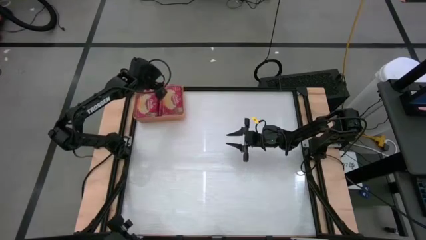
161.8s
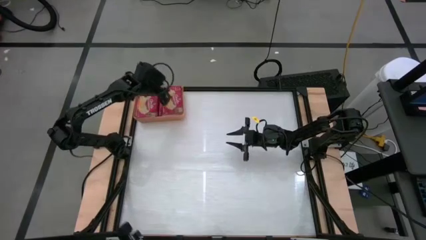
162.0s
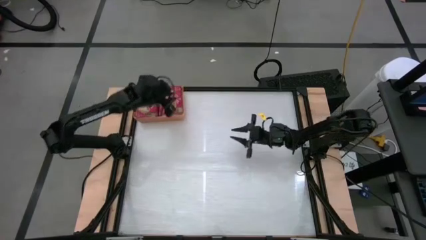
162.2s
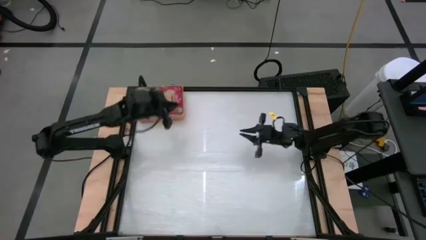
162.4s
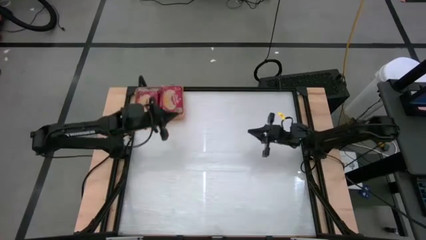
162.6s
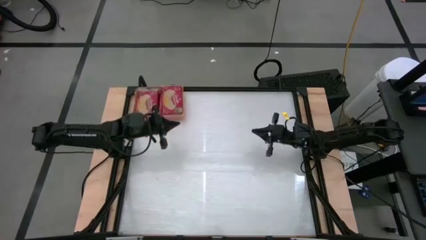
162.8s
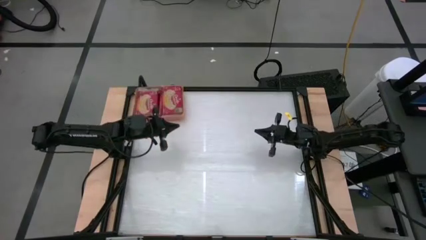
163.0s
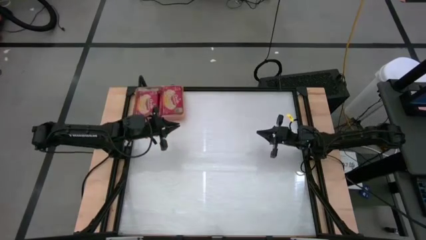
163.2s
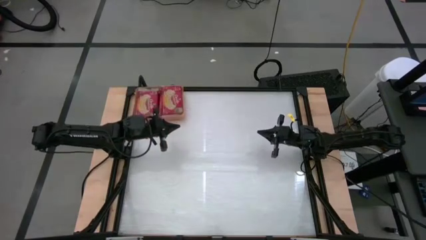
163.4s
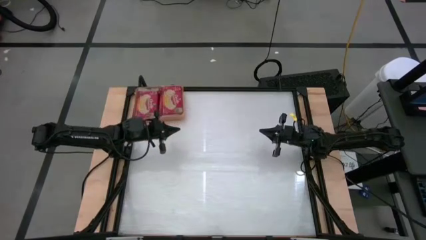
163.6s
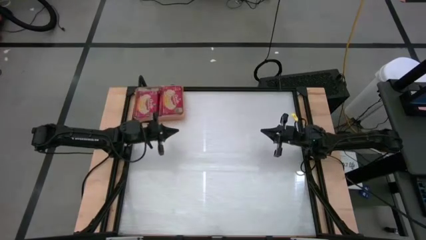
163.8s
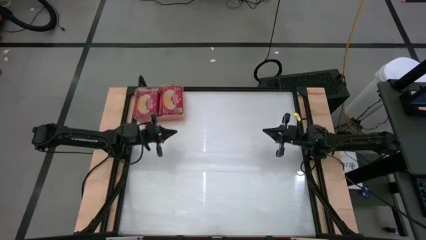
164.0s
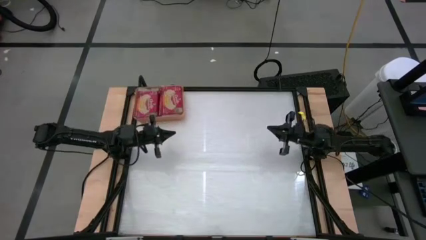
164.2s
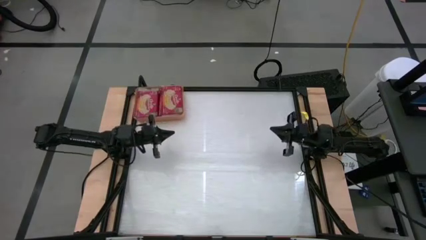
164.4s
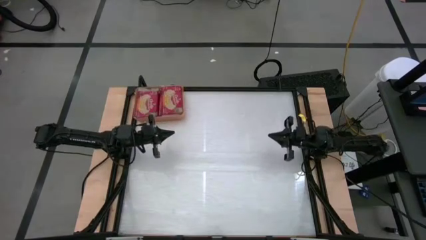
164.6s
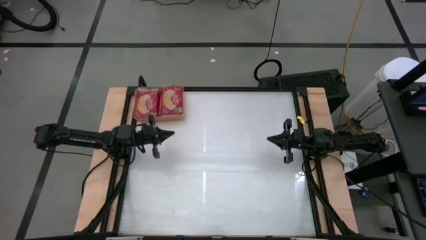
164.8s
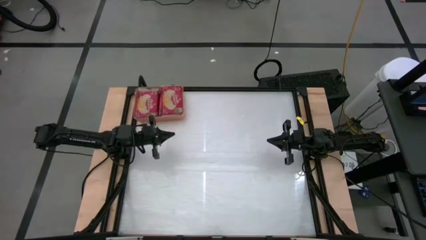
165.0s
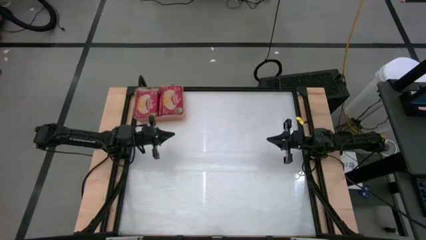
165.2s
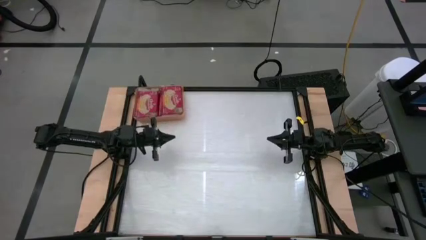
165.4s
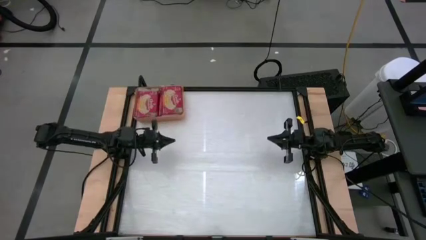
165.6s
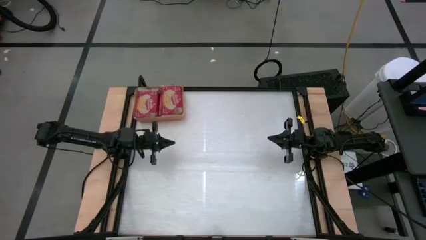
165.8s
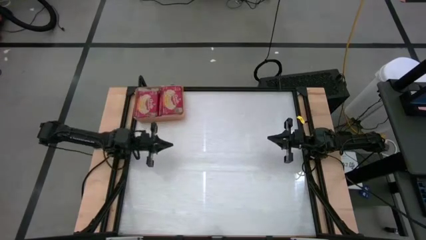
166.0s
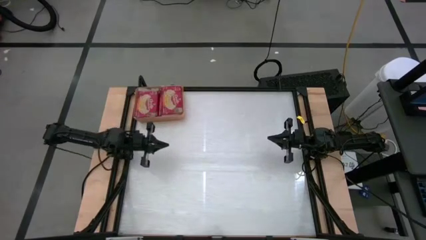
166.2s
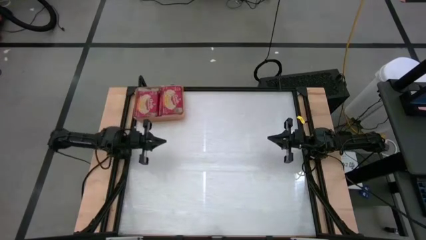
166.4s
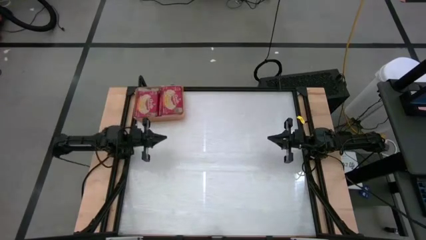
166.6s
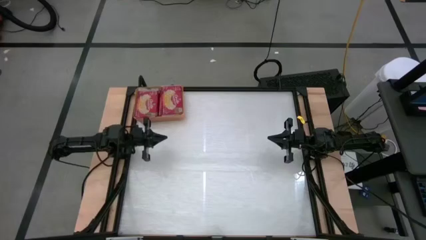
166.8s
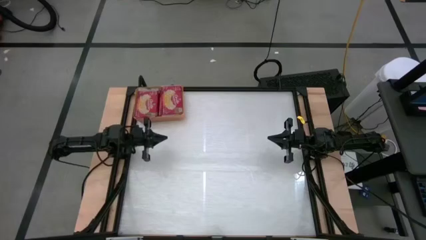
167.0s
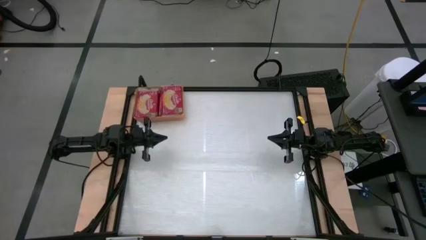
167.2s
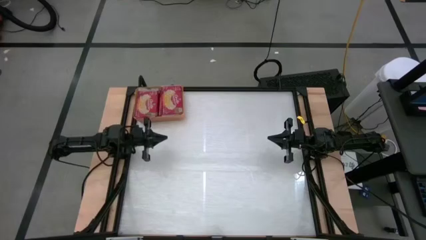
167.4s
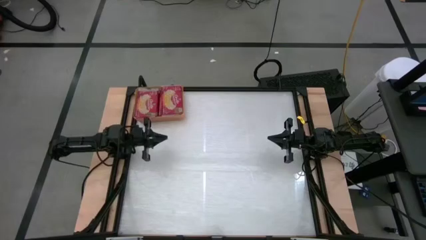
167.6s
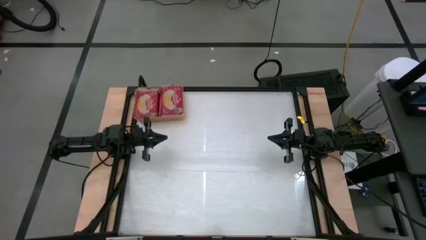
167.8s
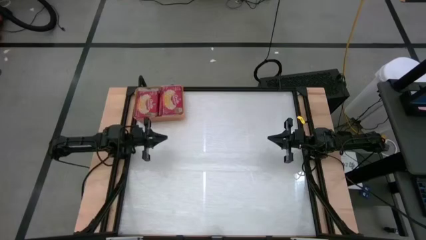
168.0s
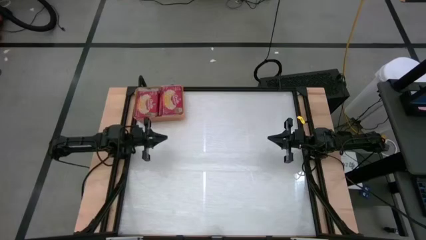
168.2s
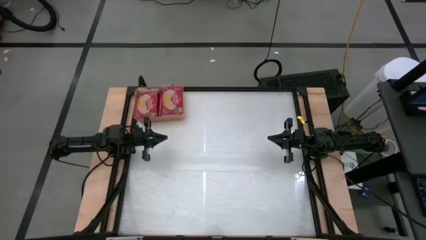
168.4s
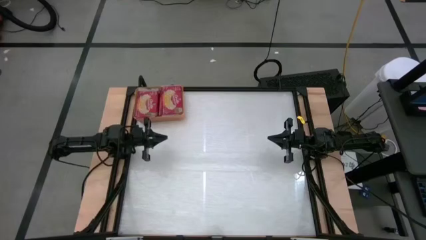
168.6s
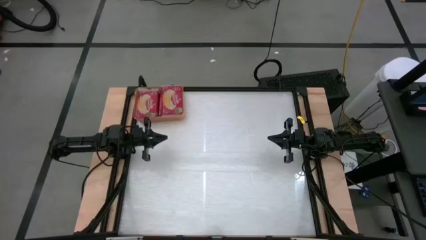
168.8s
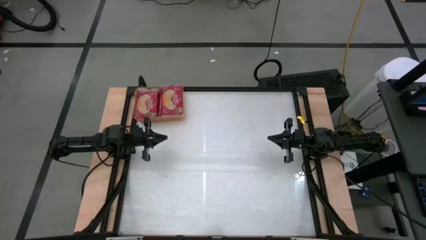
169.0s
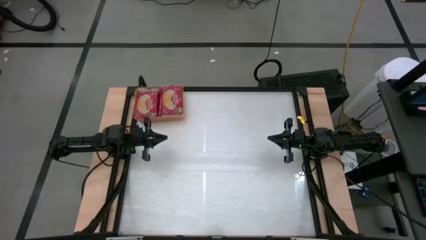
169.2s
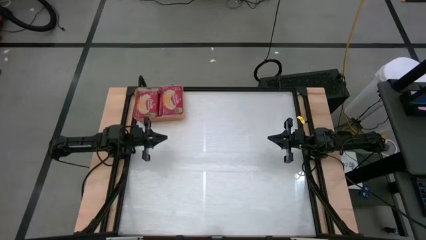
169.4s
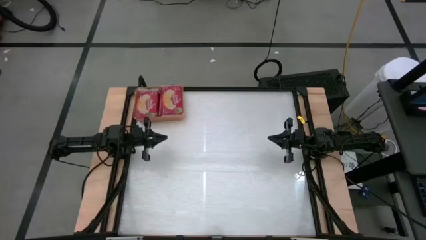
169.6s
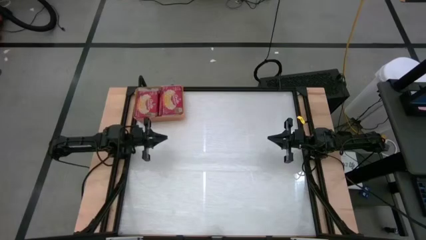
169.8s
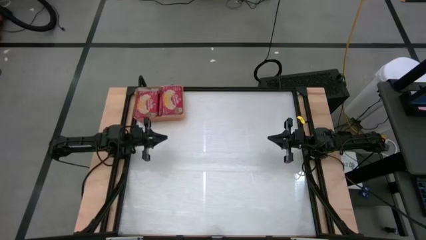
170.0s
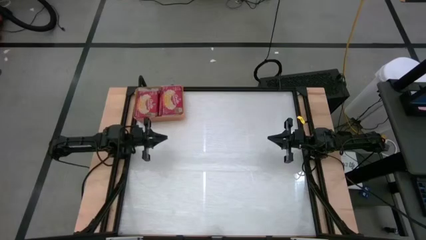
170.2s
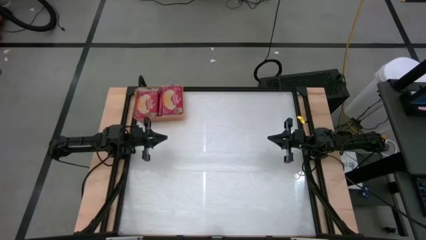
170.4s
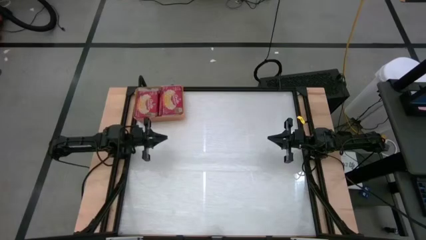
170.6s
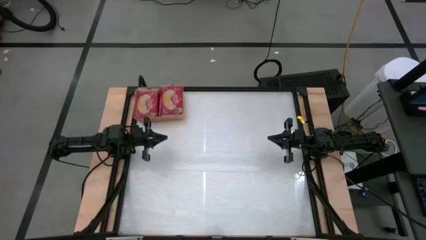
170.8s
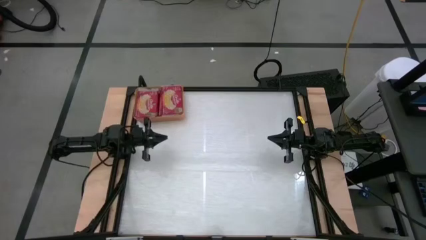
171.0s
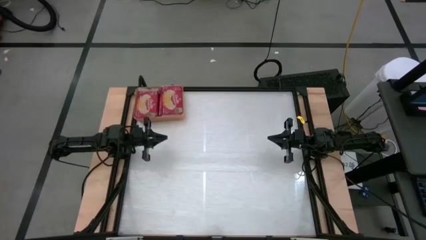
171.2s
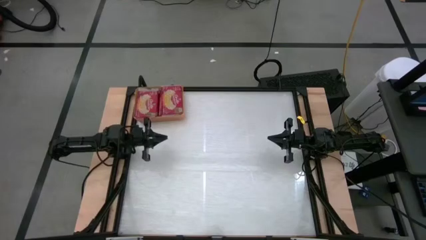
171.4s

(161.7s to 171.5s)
Task: Sort popcorn bags into baskets
Return to Home Position

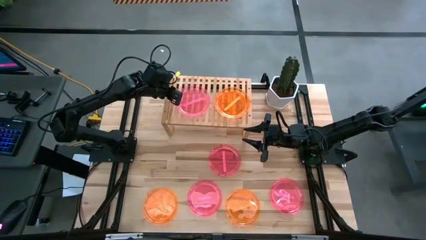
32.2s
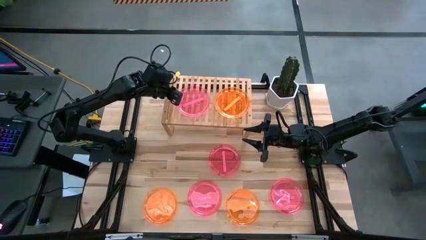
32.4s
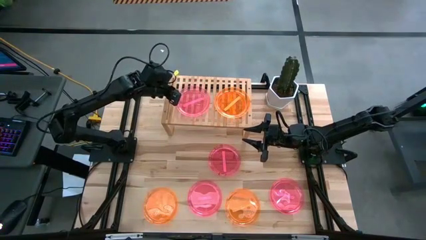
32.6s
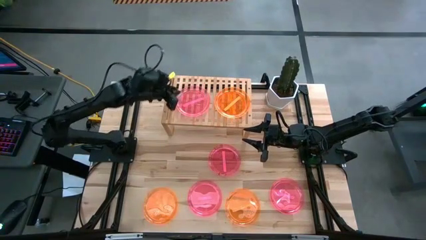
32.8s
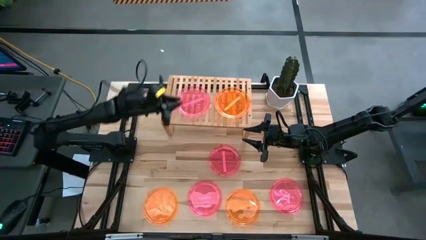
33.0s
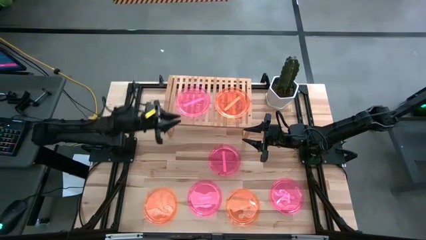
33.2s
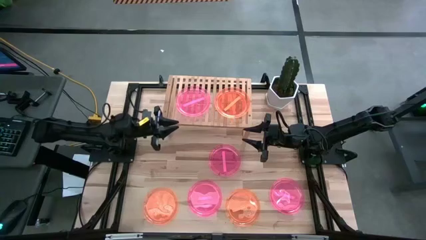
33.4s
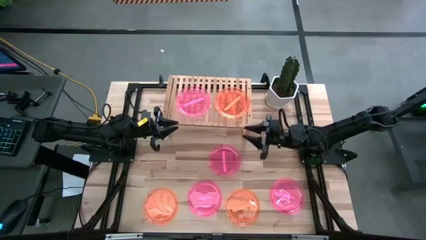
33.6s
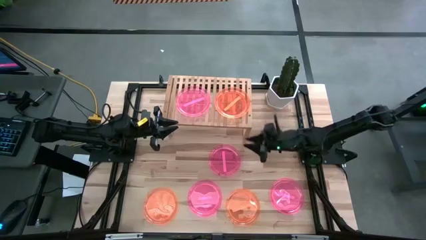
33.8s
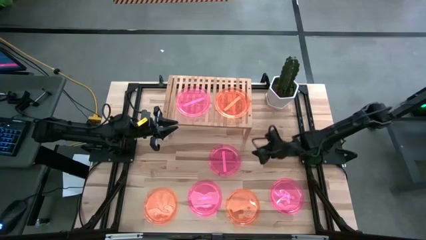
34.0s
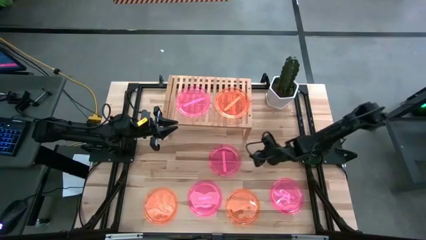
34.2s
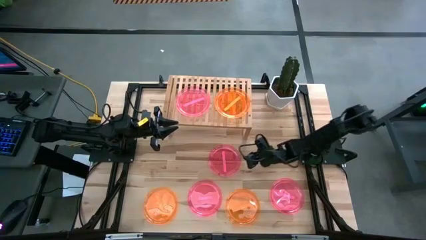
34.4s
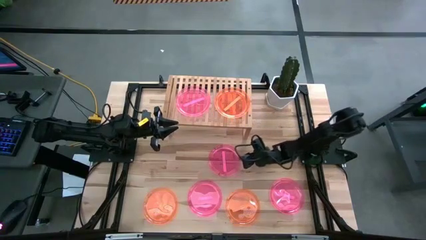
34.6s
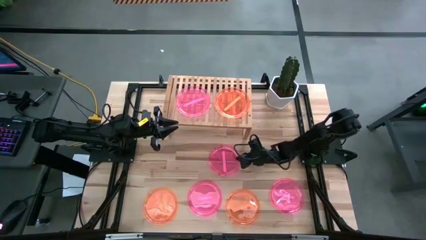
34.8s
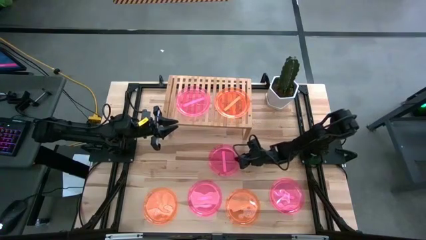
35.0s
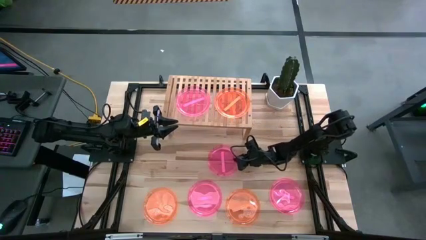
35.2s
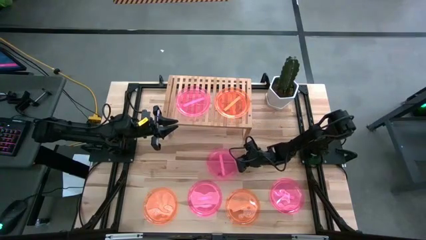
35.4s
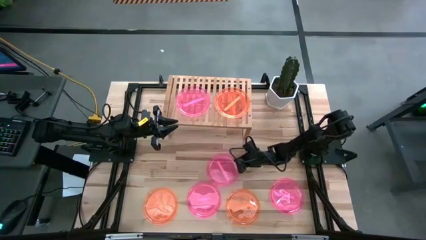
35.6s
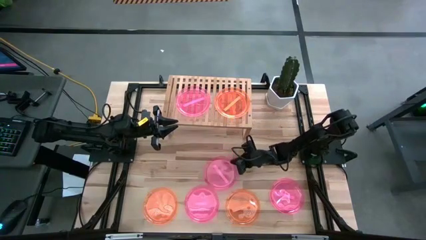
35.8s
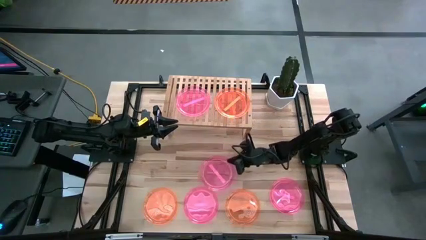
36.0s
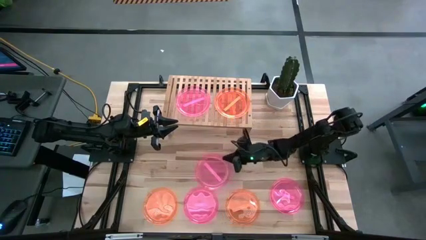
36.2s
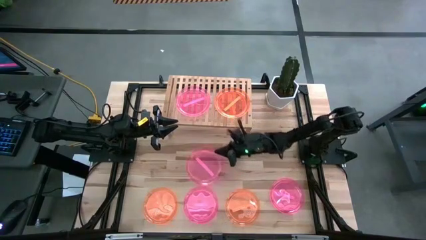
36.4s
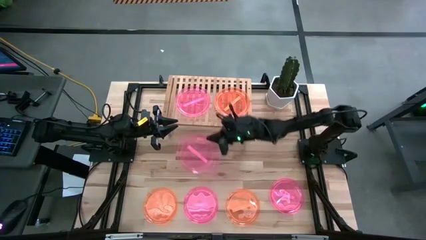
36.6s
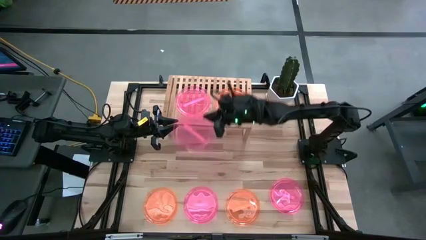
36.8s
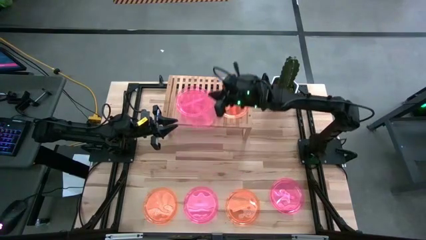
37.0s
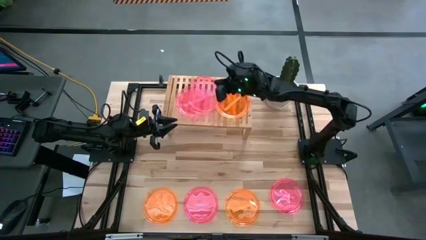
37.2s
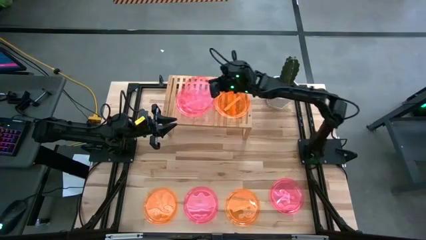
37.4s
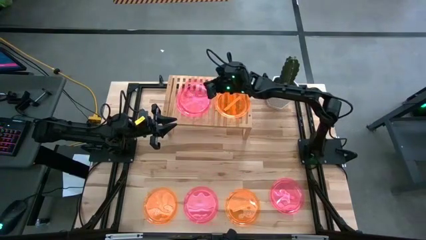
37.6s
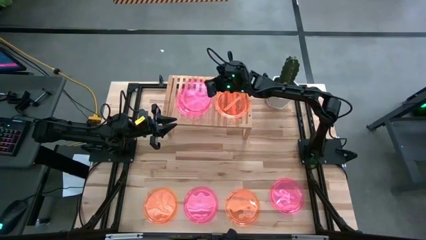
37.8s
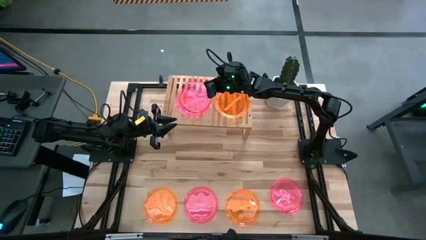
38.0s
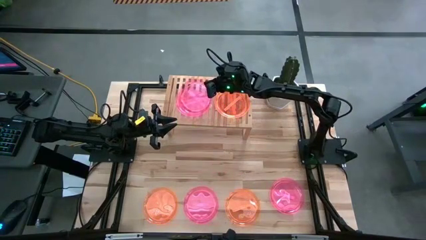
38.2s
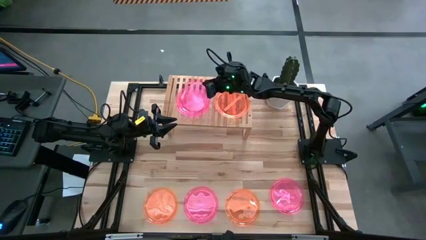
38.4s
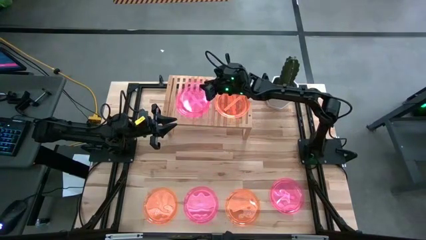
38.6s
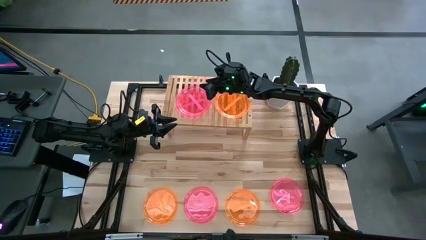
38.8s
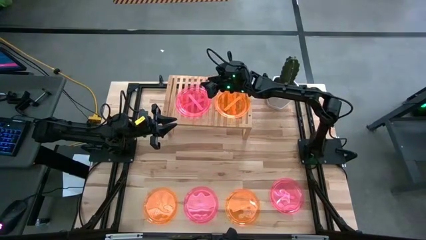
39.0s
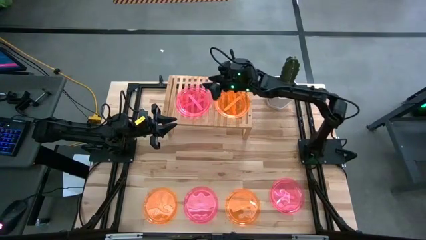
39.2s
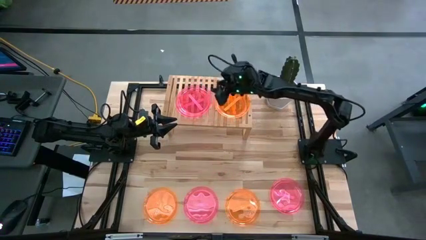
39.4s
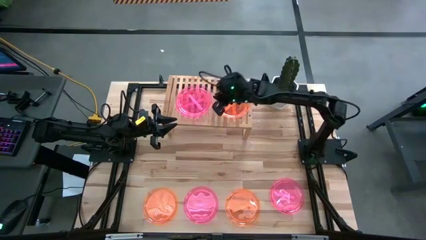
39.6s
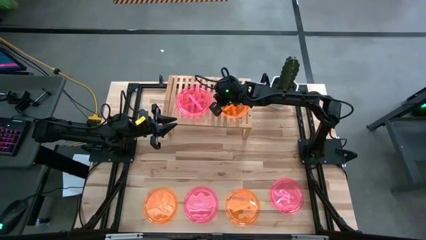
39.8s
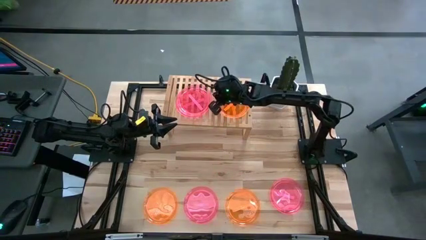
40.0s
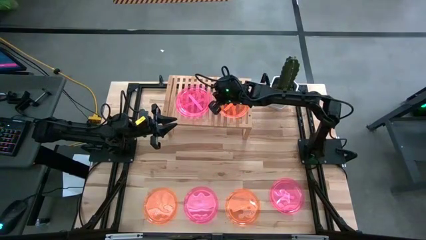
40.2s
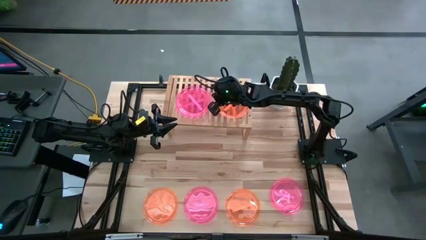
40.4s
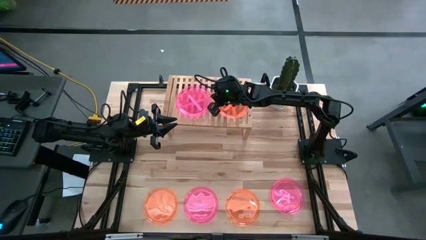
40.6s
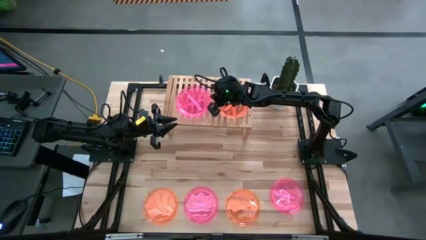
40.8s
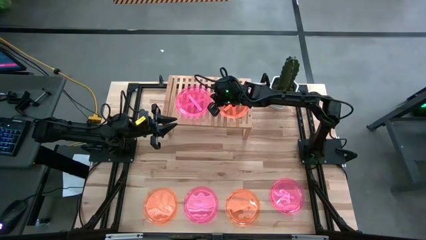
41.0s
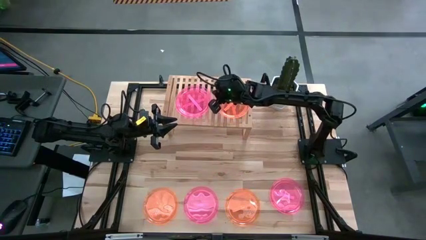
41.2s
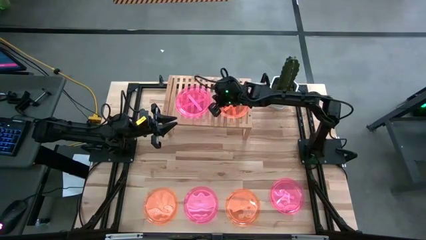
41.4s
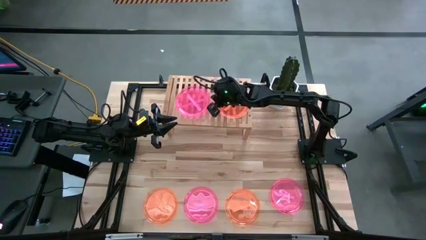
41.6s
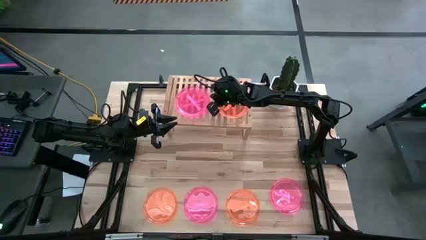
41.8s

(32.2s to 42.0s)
Task: Place and stack plates onto a shelf
Stack the pink plate on top of the other pink plate on the shelf
